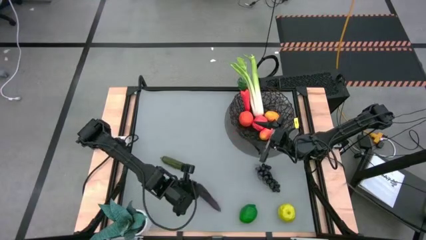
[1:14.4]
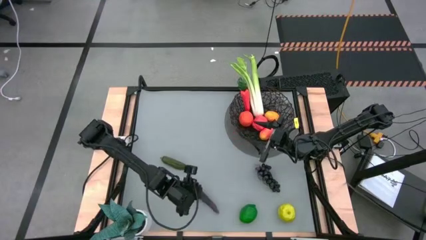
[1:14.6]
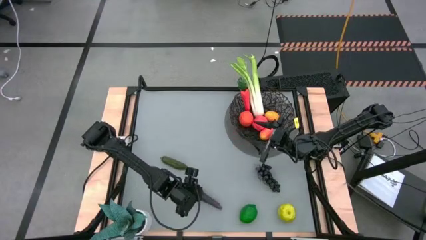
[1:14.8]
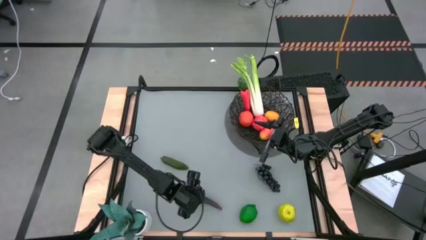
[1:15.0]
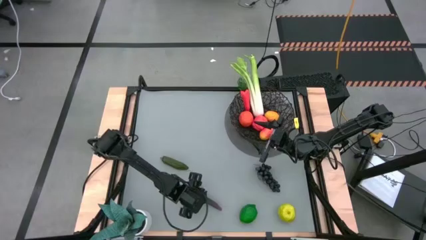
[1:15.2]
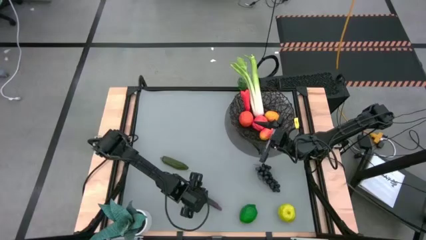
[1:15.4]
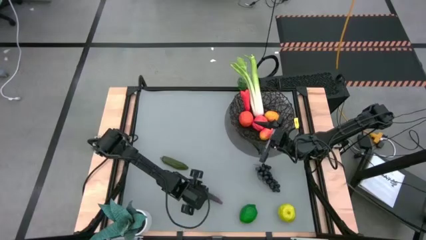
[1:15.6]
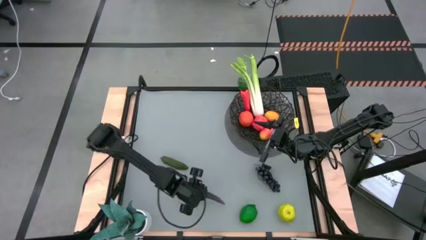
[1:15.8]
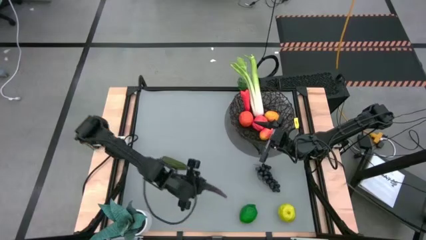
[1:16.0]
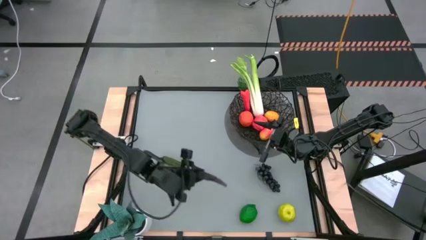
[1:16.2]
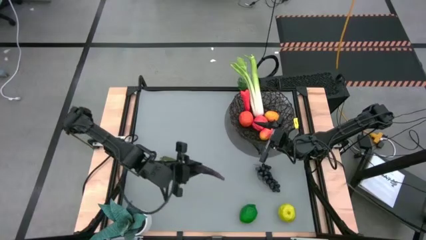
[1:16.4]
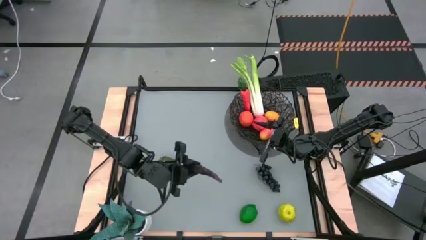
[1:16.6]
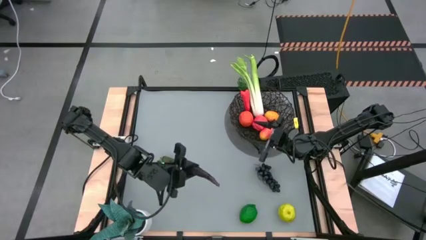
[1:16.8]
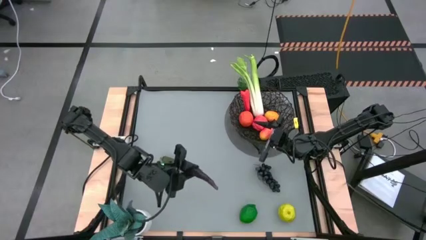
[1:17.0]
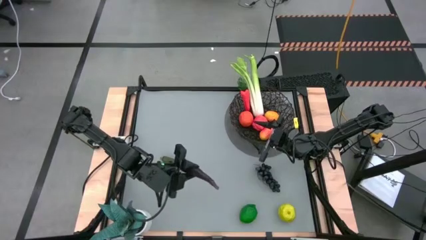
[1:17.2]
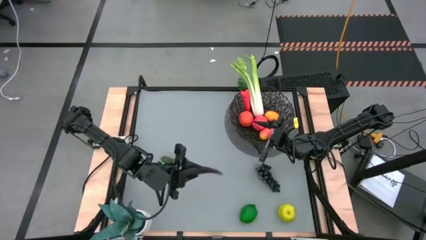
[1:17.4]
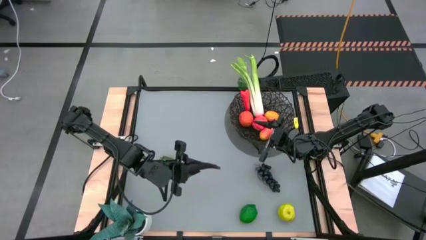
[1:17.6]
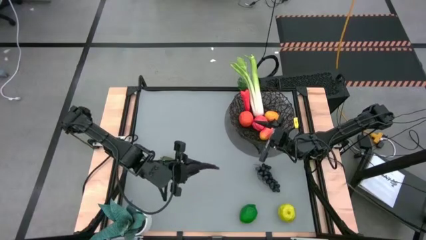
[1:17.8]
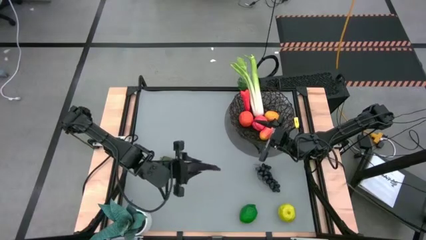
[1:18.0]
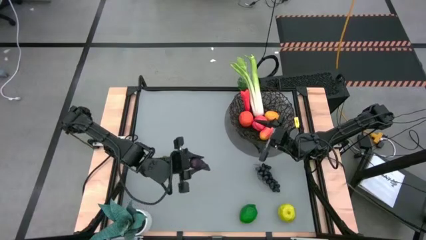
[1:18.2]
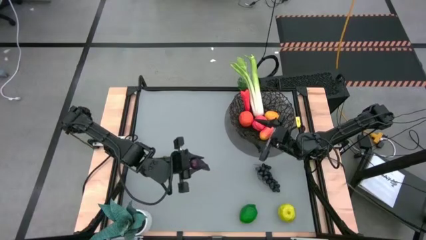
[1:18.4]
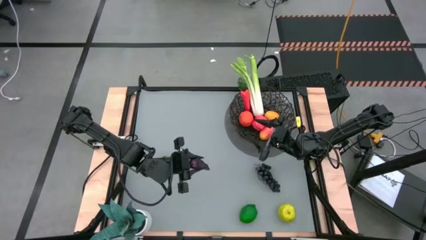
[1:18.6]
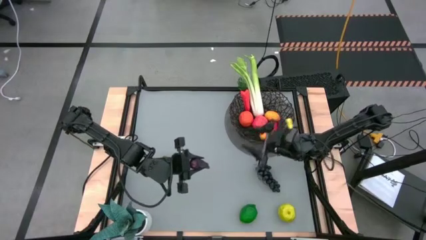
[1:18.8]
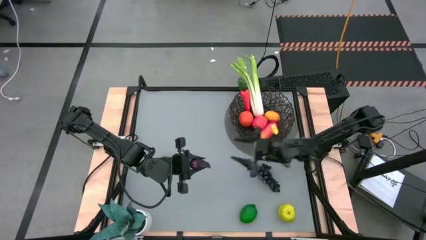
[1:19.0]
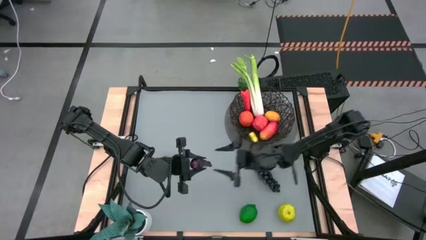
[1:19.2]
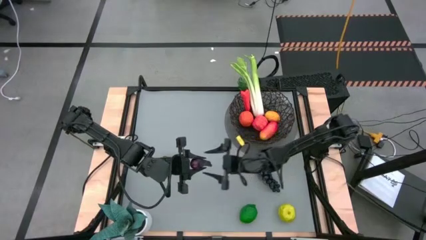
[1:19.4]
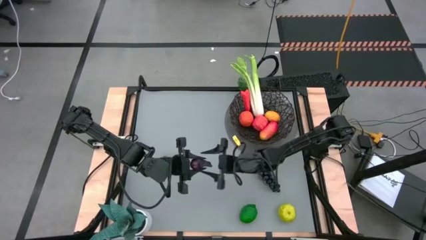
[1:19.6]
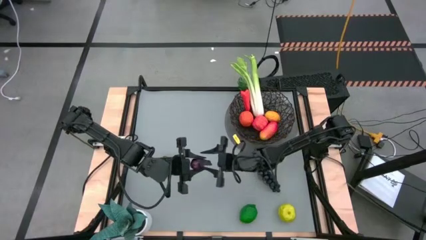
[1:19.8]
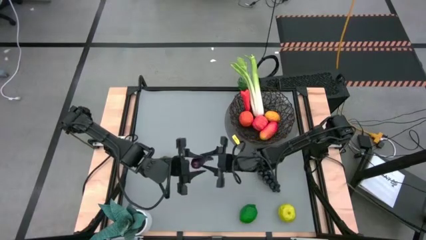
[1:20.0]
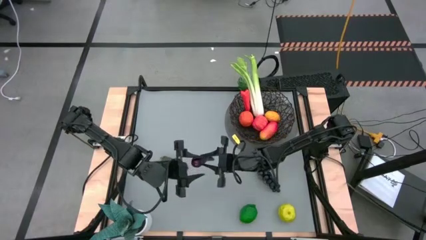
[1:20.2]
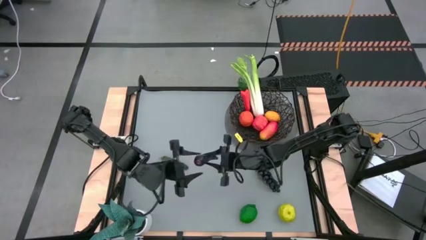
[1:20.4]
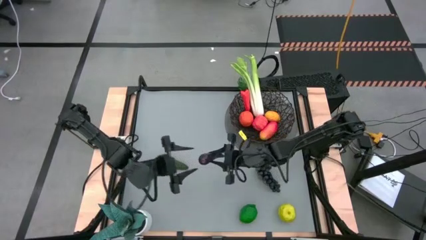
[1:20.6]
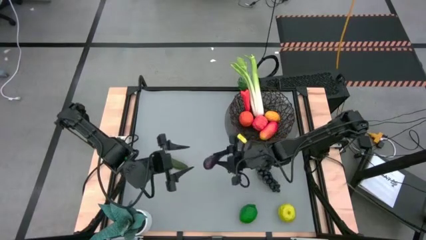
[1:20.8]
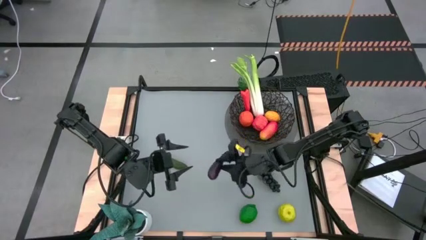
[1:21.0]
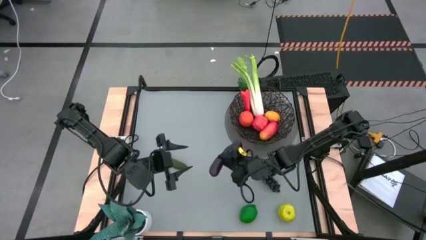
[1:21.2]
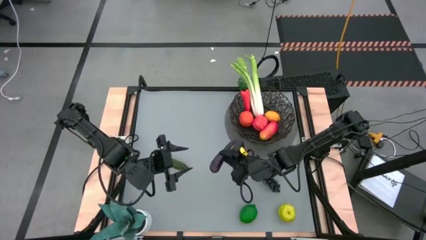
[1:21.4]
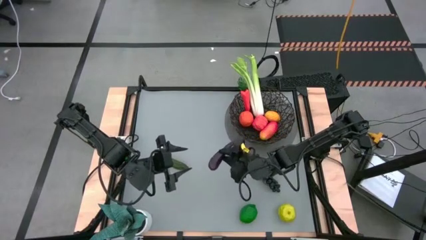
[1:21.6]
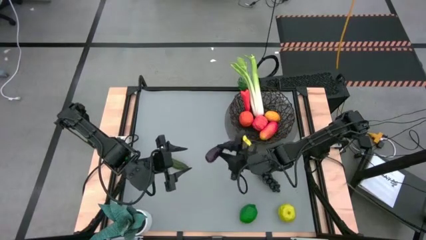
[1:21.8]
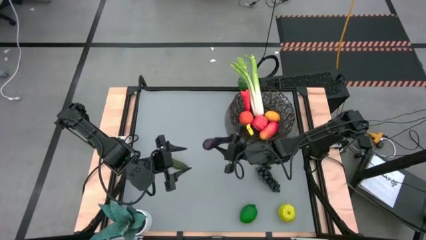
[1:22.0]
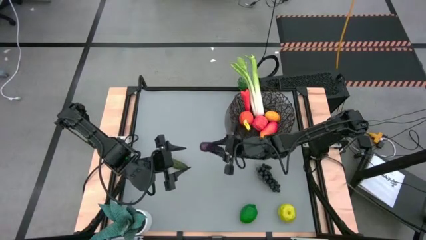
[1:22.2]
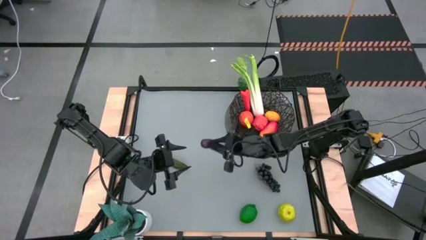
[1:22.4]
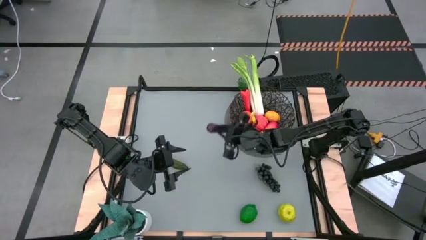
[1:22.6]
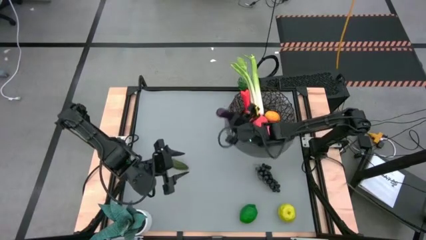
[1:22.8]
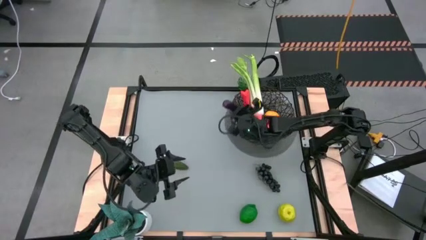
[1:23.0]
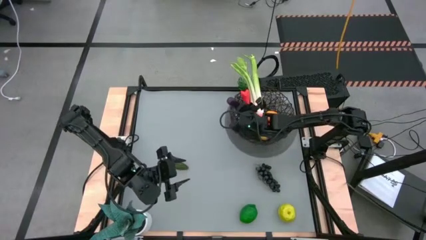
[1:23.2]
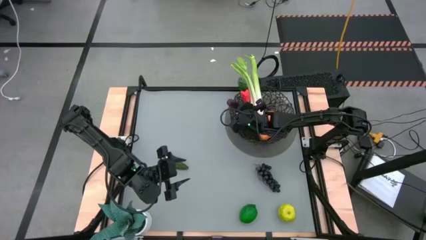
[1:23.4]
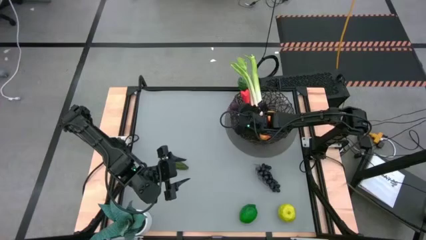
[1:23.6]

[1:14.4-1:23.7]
Task: Build produce basket
Put the eggplant into the black wire basket

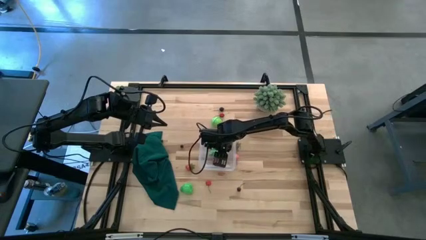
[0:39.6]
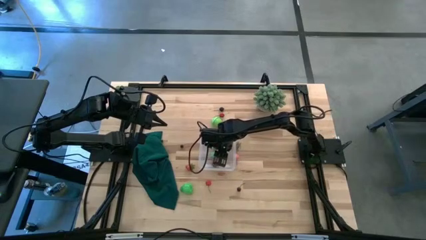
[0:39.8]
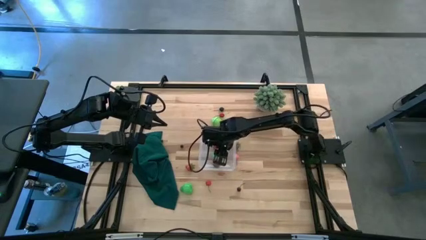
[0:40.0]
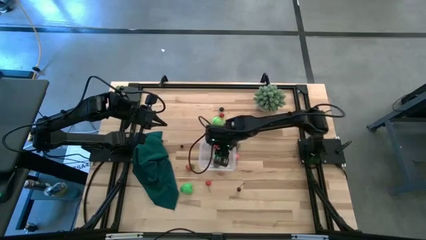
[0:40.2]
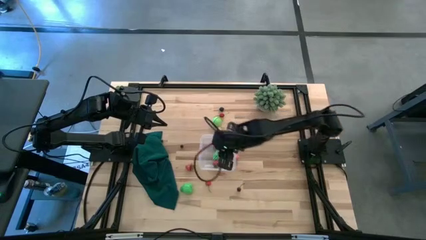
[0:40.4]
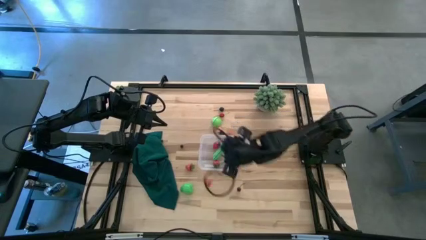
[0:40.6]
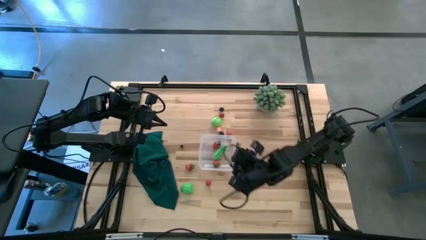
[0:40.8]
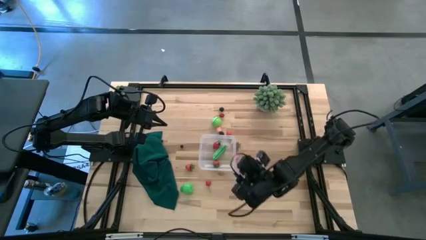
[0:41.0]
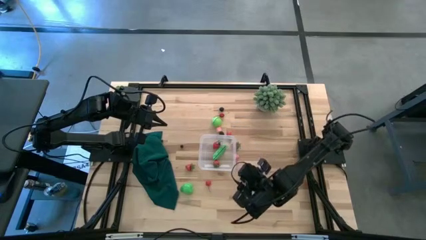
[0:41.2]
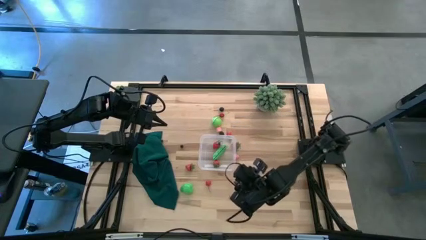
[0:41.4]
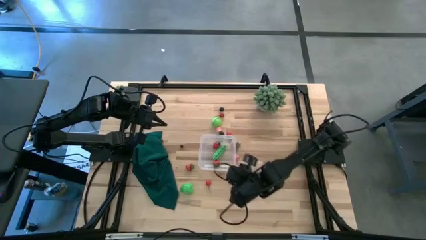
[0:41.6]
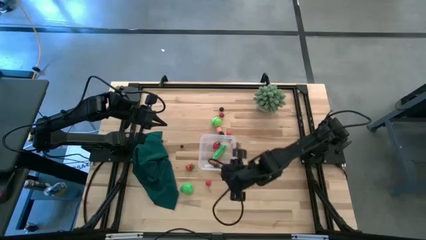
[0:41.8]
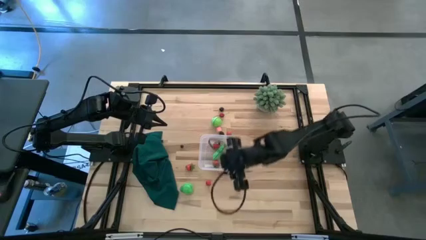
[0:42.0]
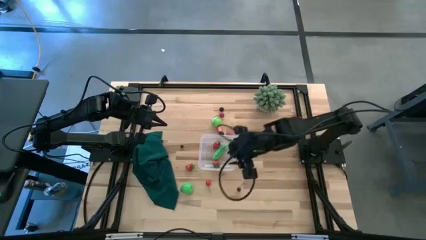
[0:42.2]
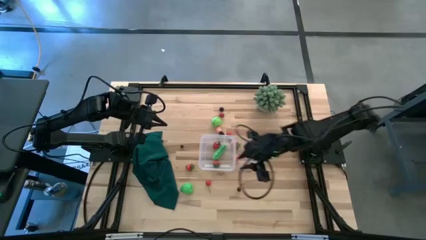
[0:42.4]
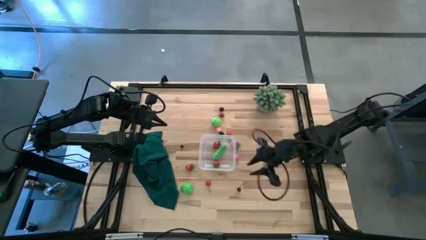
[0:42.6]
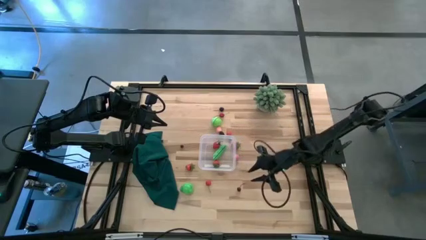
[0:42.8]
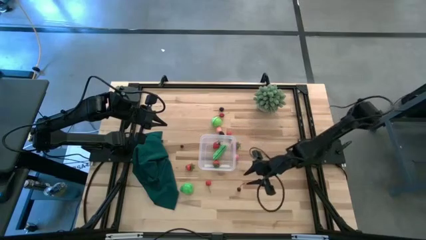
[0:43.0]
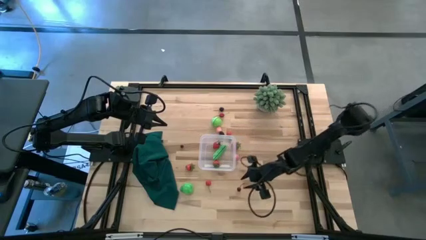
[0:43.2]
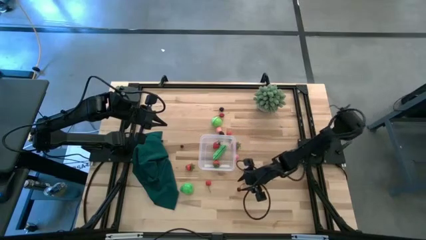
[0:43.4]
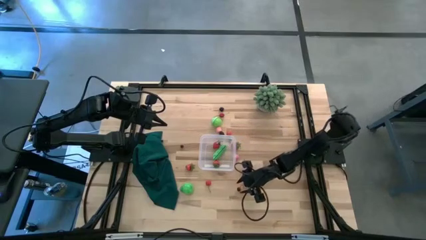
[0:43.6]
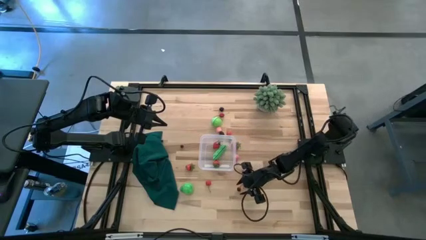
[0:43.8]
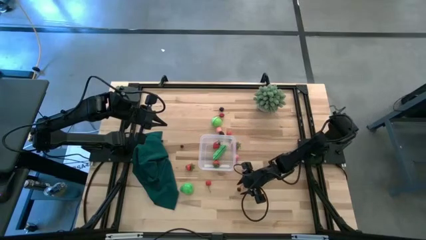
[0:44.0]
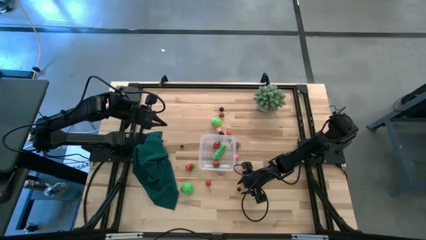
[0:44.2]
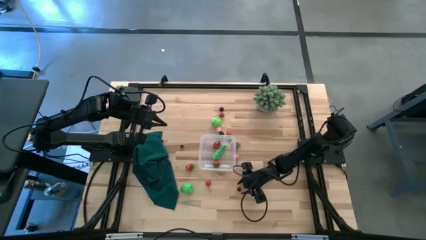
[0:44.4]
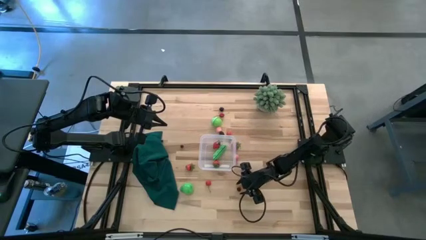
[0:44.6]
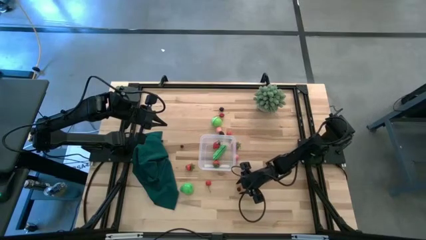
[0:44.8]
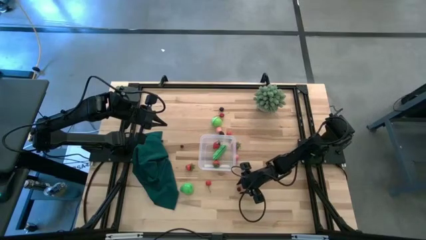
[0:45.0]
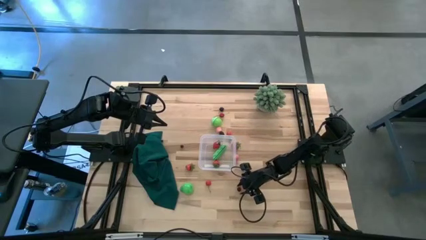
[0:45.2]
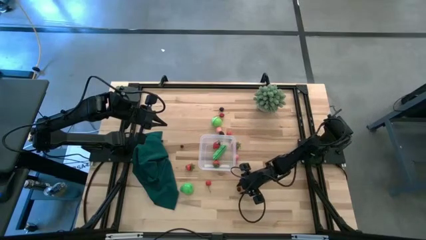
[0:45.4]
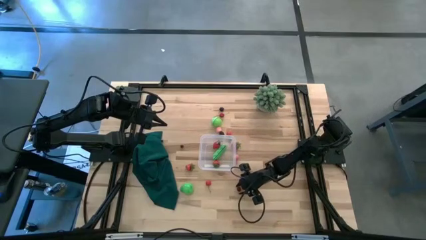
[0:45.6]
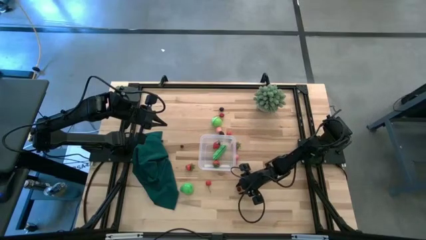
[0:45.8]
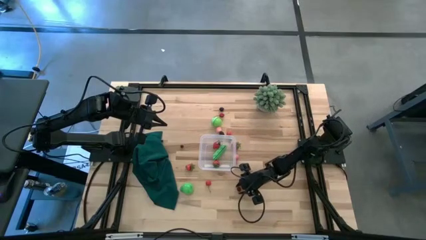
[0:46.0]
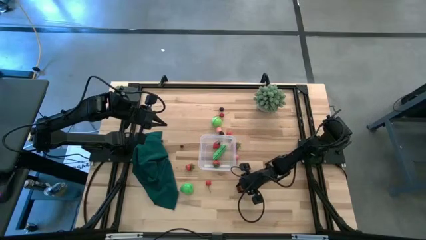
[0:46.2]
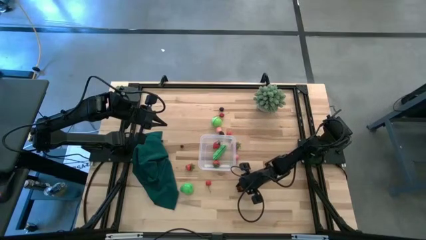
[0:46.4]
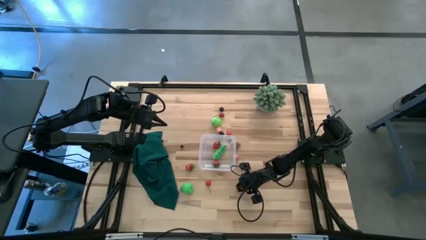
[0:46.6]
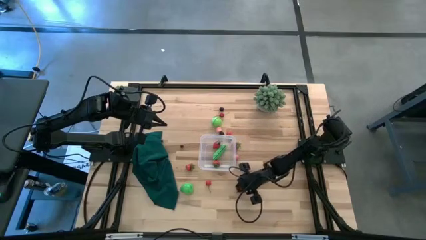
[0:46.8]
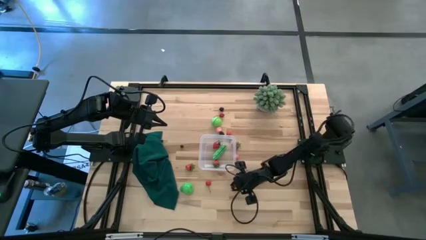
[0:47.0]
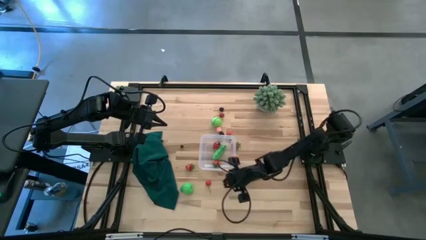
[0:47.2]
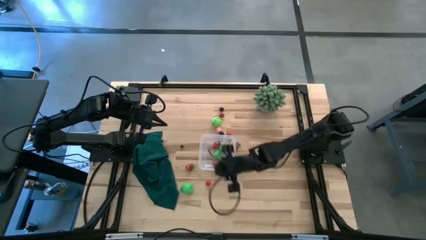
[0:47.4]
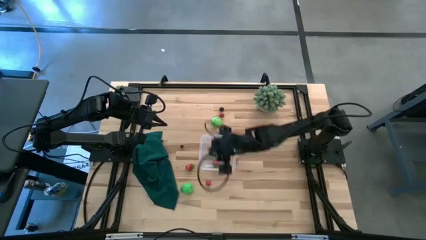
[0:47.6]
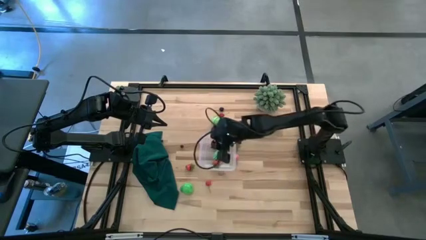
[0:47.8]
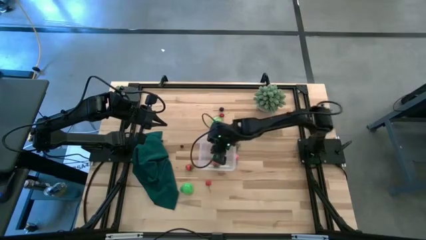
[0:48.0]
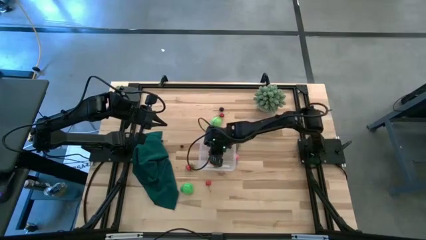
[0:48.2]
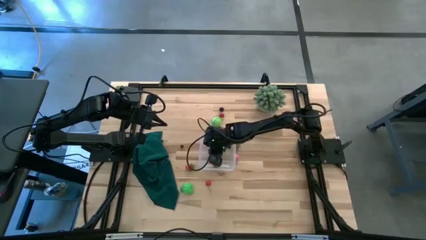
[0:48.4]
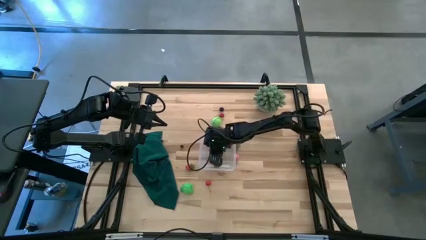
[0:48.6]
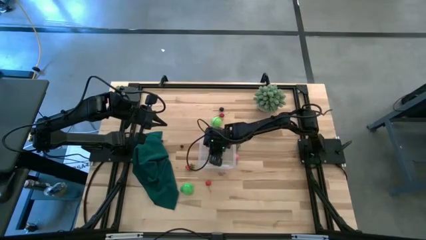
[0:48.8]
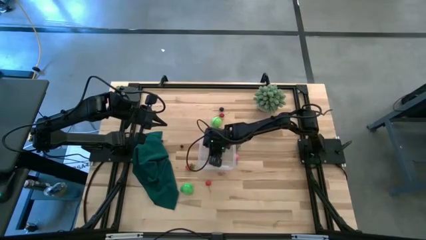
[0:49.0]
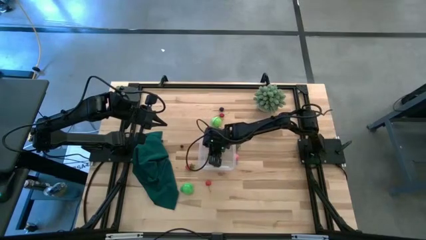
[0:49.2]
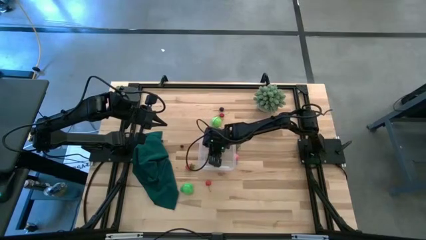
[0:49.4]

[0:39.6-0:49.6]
Task: Pick and placing Produce into tupperware
Put the red cherry into the transparent bin
